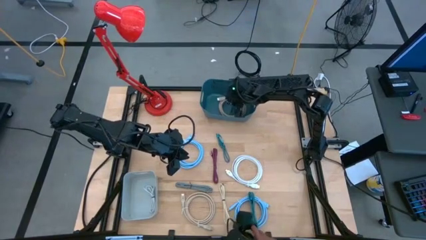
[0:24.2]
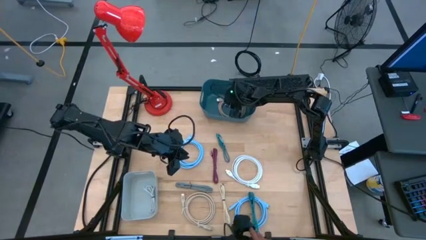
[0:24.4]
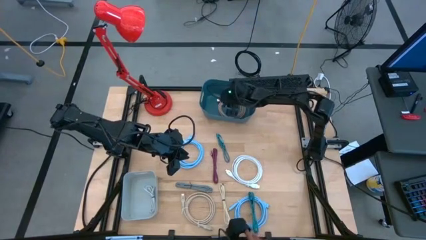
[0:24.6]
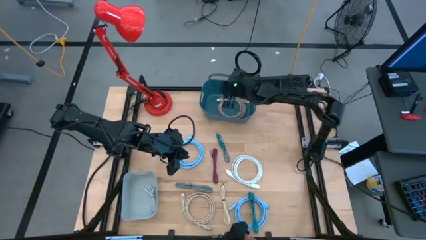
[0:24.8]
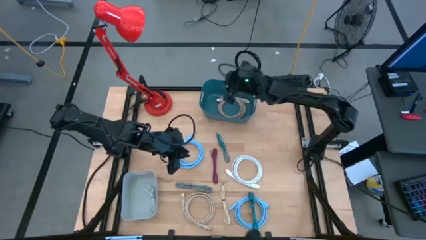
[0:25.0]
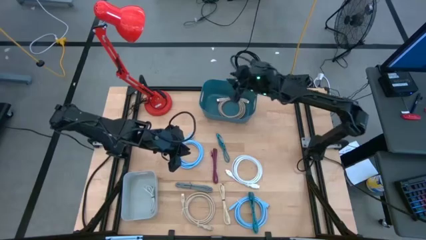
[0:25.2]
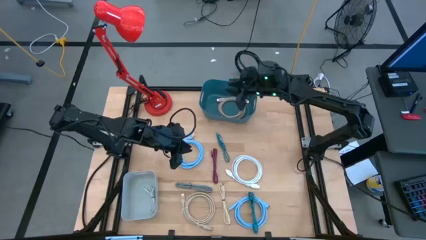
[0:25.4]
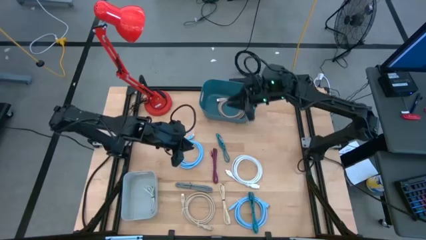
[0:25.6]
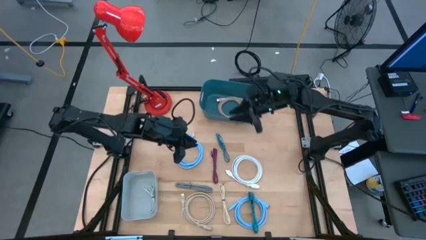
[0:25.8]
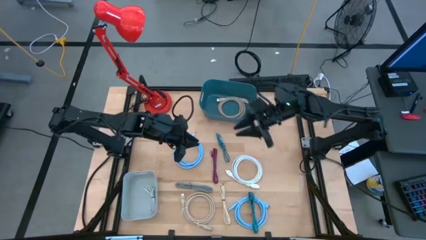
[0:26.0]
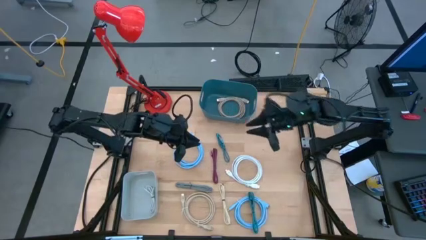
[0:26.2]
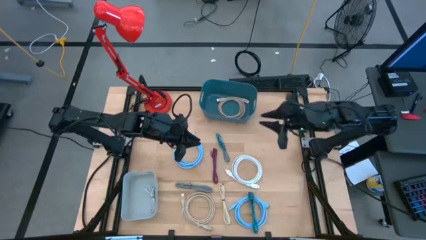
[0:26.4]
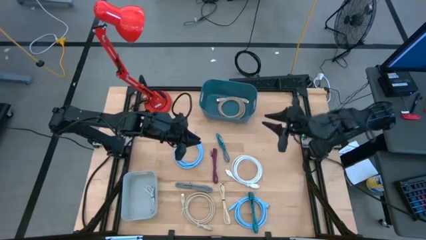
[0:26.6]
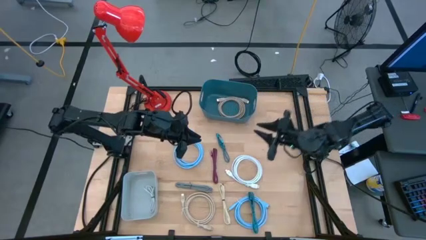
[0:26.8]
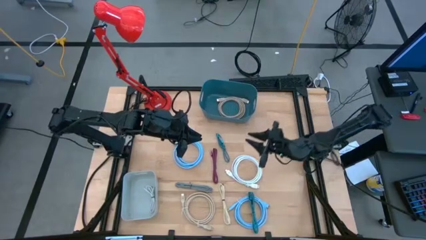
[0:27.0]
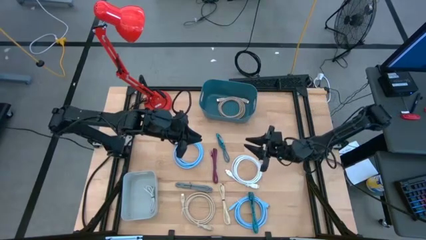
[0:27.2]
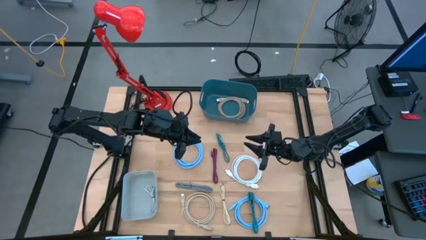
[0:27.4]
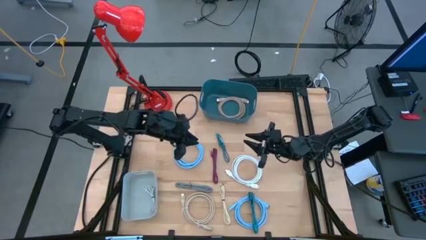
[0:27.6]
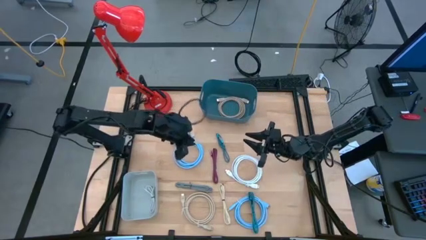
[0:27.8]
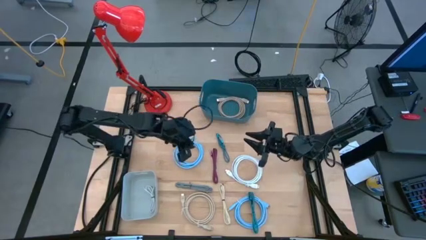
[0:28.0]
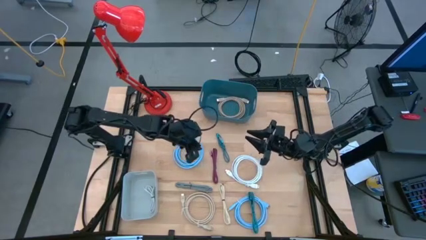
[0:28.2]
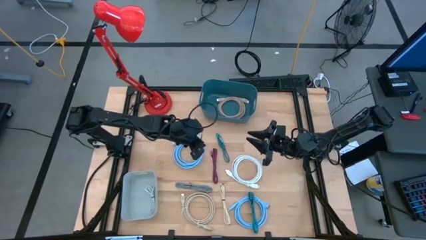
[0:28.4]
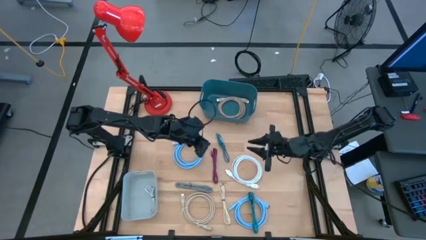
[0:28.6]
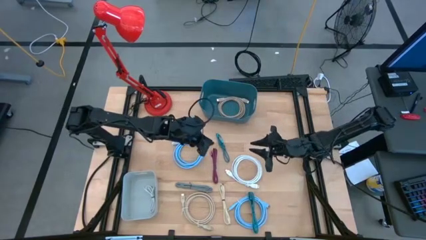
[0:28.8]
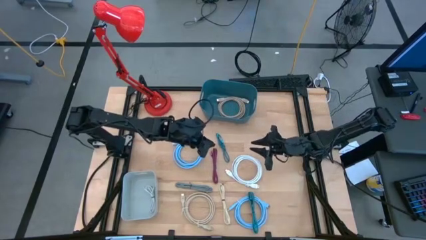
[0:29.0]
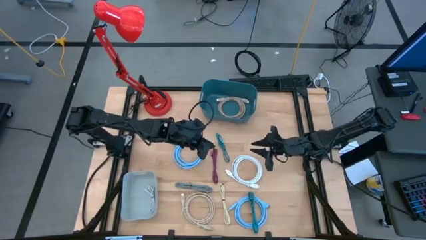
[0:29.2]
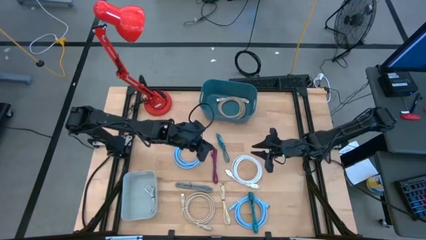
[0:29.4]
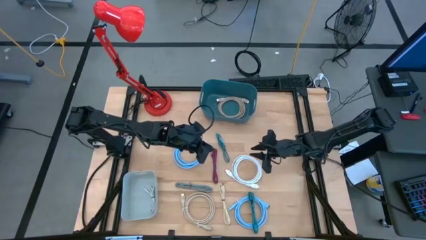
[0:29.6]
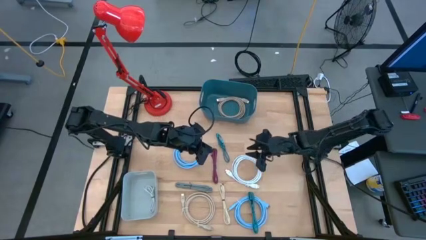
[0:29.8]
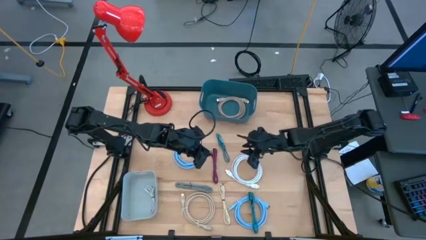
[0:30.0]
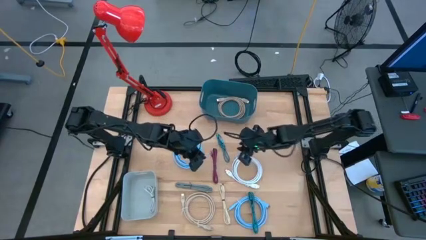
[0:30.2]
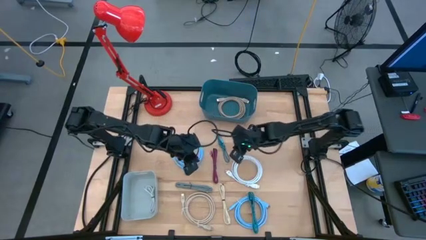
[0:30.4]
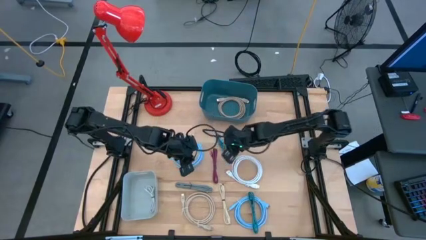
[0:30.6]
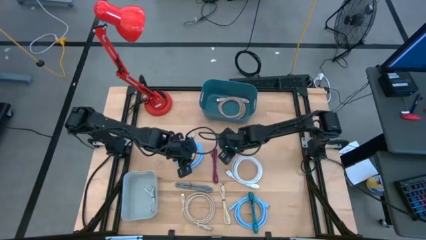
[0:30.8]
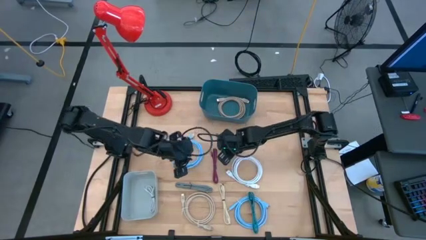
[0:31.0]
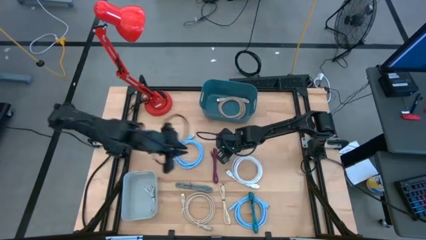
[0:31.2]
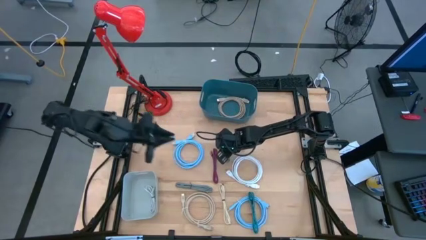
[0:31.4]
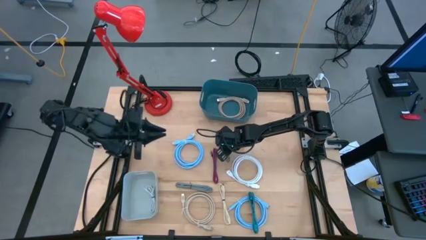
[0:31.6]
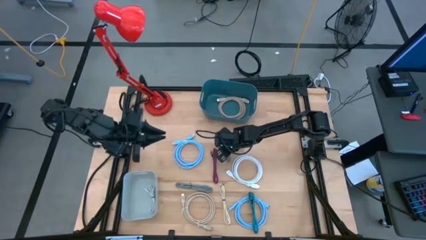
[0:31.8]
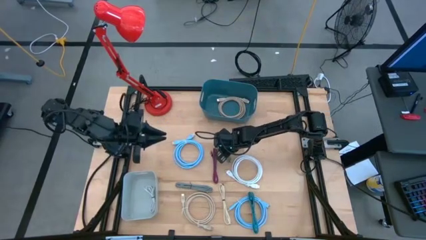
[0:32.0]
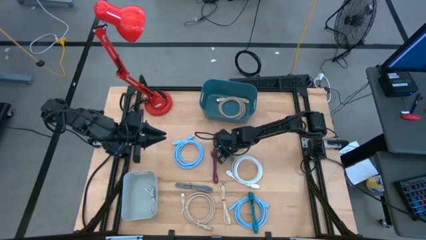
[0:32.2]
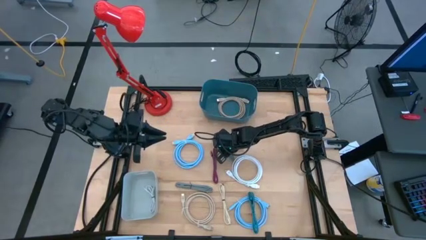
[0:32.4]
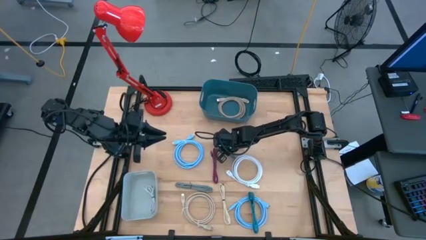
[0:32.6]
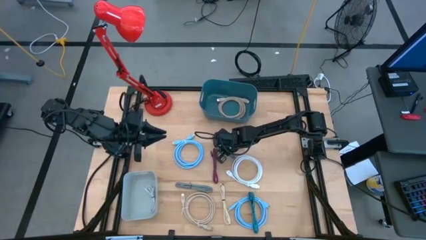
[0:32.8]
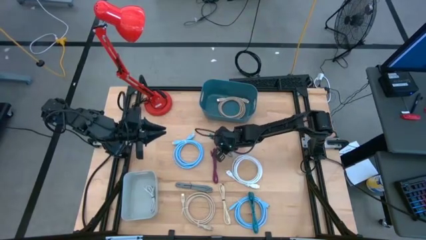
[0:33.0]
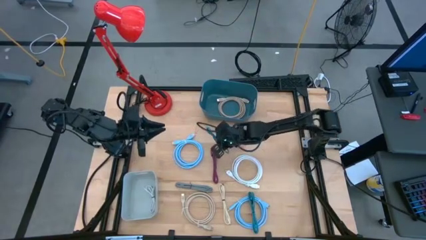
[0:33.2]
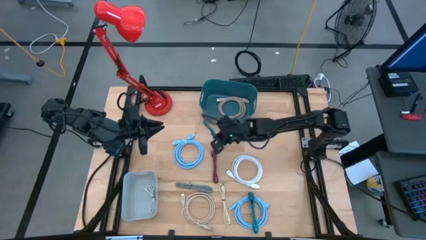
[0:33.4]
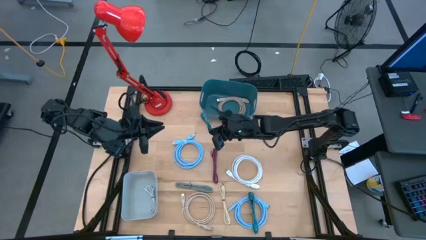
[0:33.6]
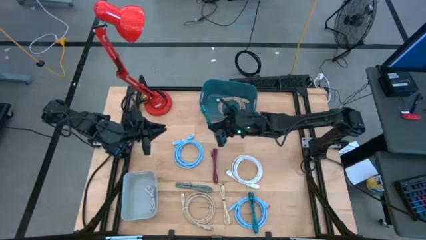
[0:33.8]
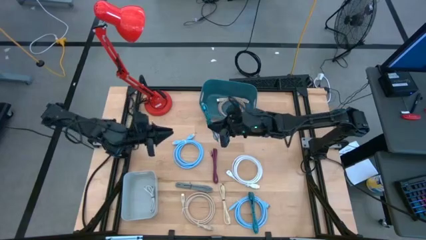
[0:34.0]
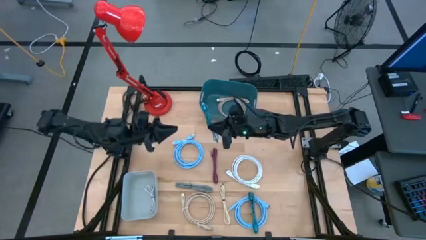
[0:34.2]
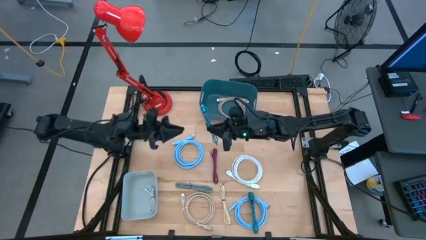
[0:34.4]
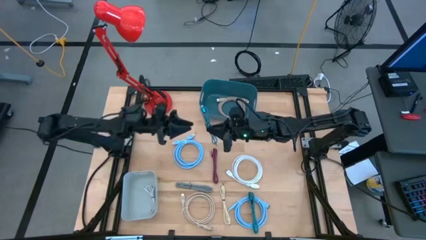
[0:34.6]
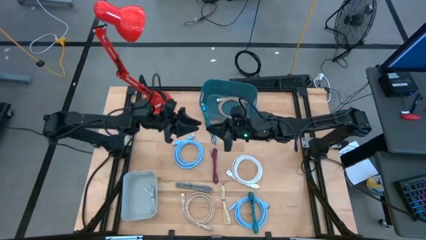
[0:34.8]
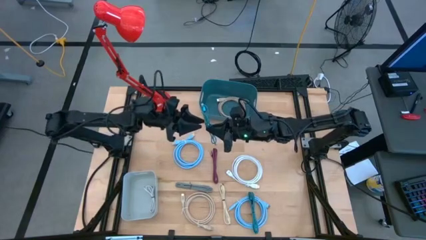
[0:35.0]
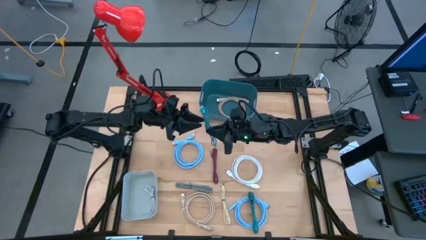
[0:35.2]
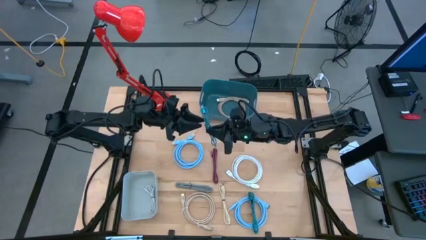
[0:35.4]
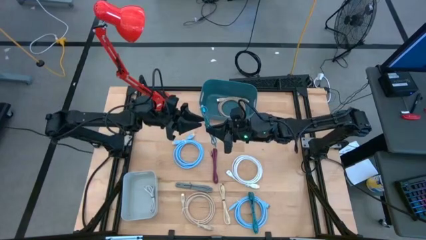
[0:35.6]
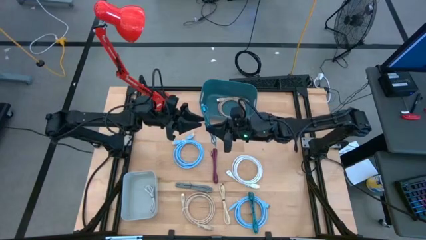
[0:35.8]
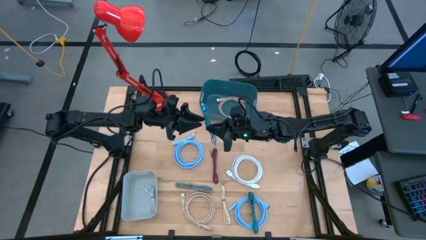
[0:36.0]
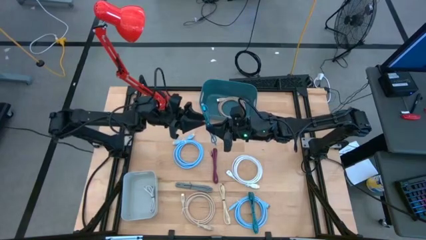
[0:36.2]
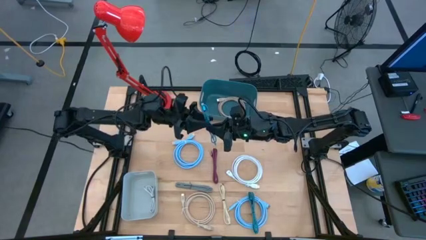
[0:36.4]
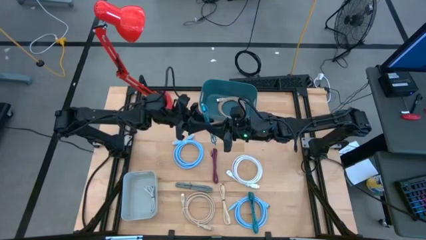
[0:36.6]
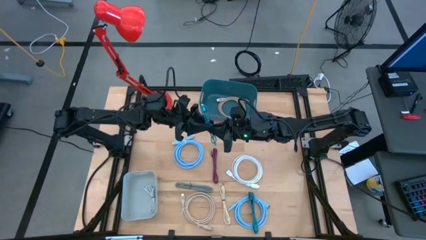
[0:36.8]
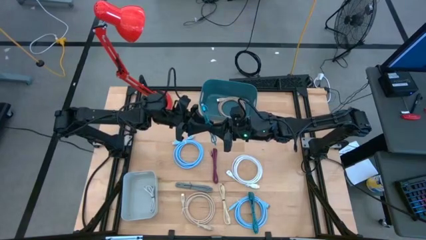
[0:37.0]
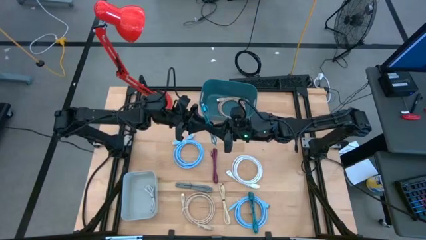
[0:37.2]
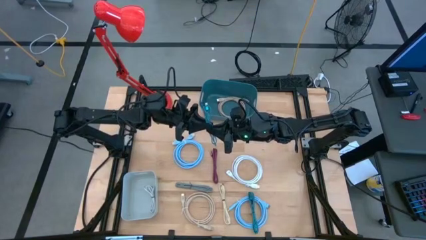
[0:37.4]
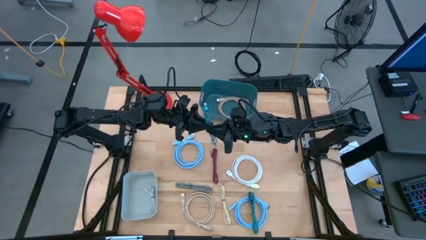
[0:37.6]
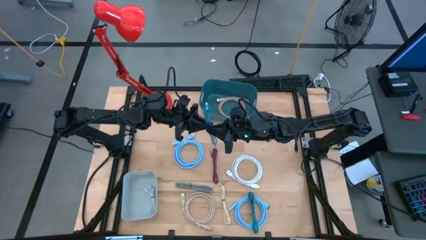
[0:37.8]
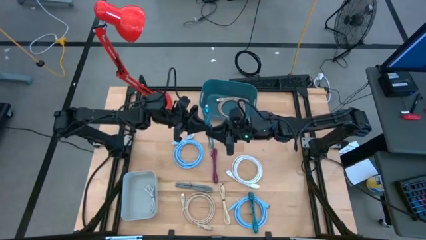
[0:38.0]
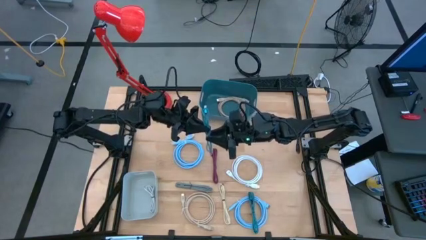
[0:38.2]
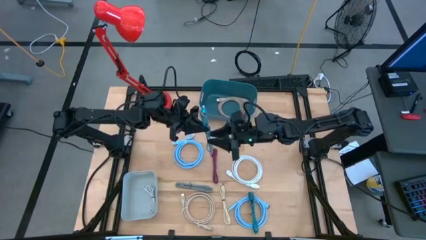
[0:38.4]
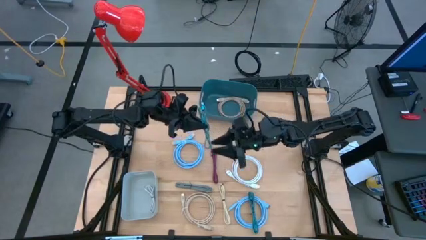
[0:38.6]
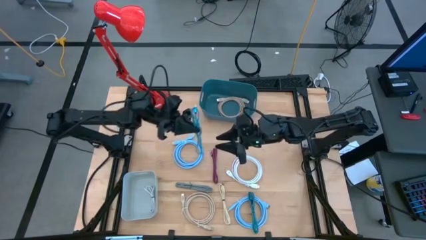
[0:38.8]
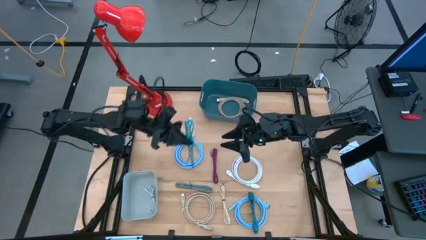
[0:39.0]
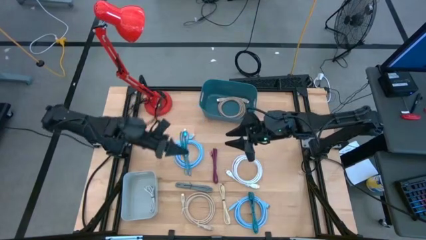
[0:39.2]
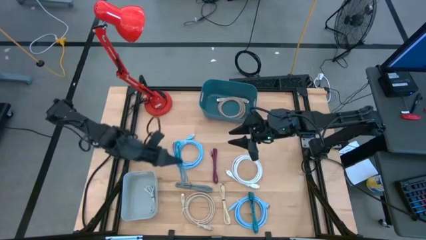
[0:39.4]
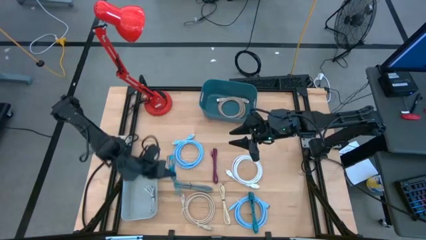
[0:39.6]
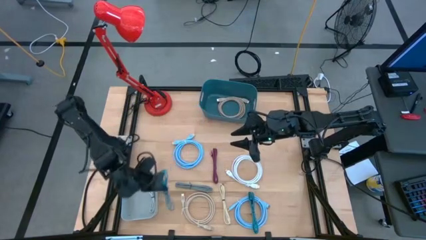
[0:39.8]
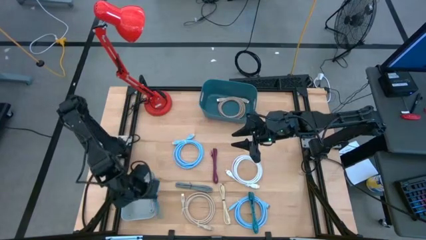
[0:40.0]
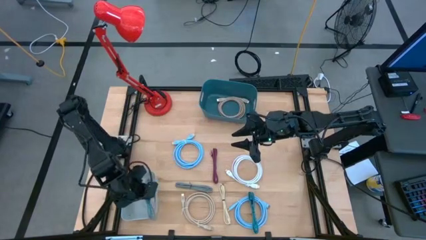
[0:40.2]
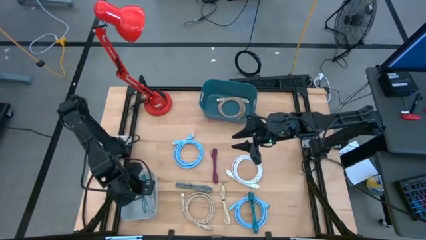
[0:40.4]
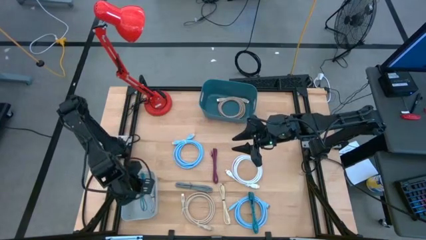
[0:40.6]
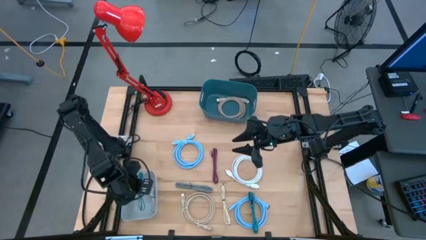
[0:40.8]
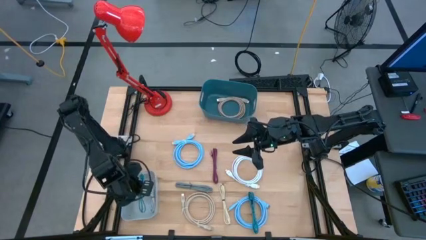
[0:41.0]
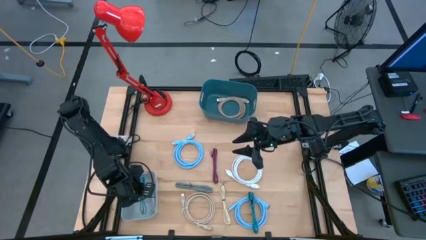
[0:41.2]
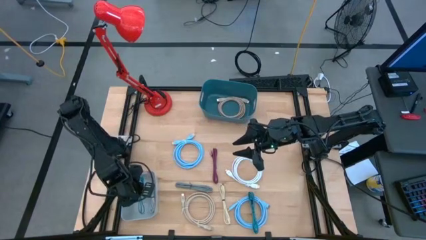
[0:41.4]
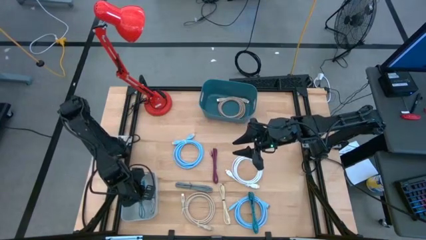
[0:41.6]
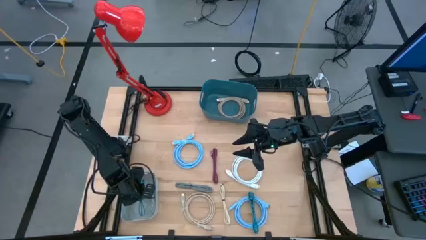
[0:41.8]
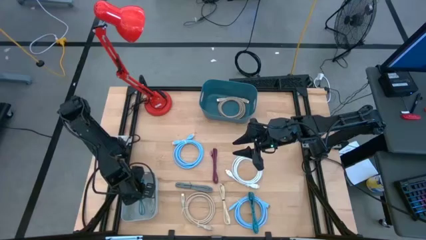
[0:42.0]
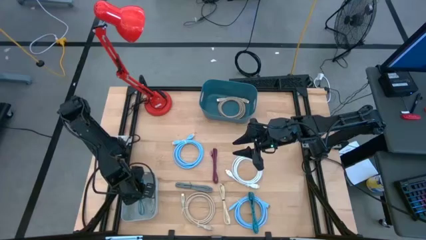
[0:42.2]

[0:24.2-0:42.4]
Task: Pick & Place USB Port
Put the top blue charger cable into the gray bin
